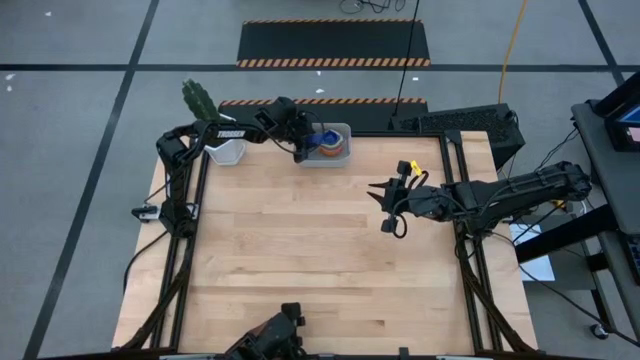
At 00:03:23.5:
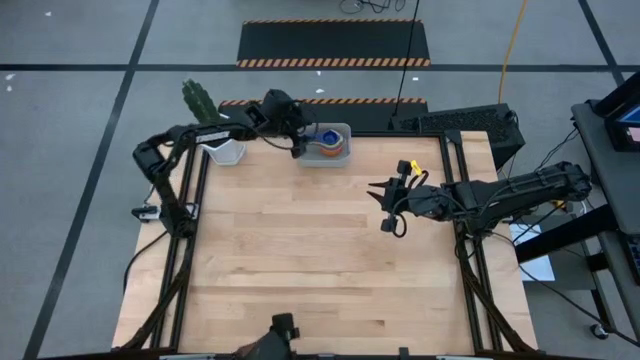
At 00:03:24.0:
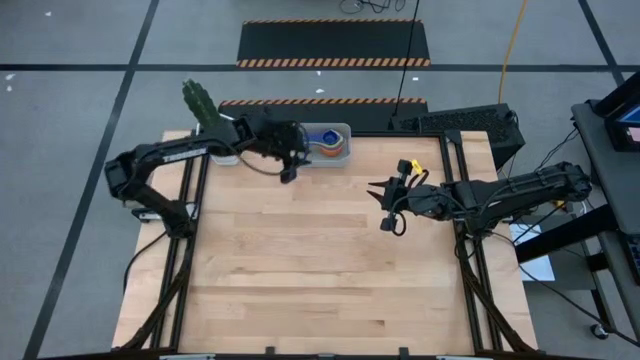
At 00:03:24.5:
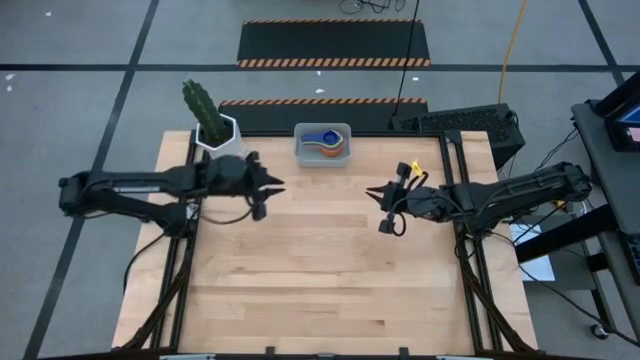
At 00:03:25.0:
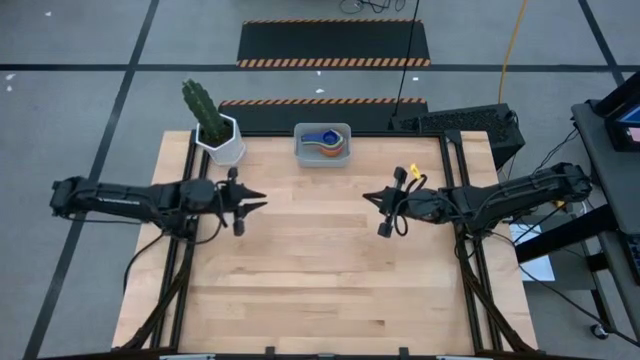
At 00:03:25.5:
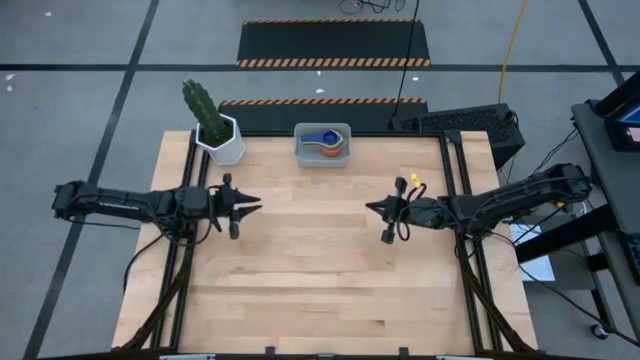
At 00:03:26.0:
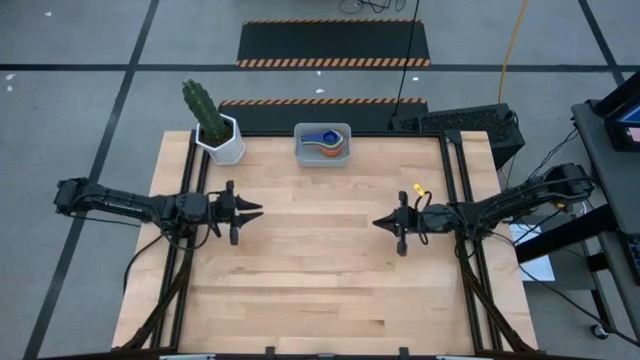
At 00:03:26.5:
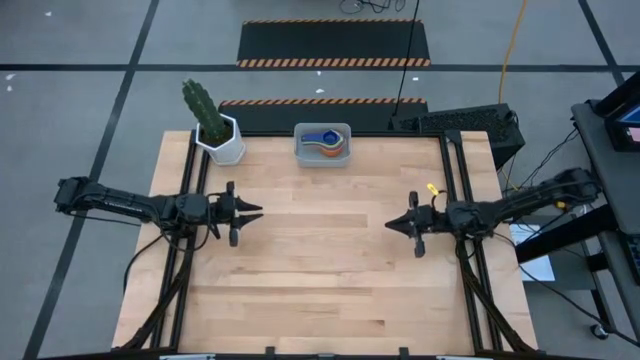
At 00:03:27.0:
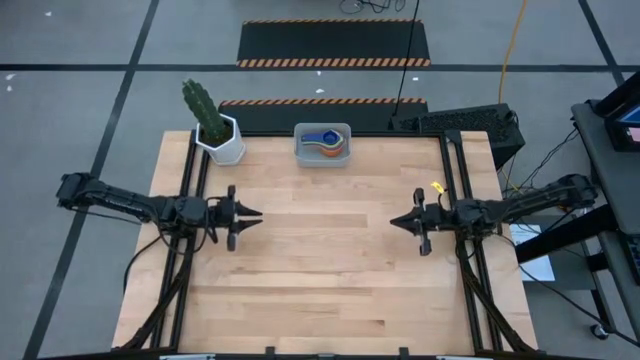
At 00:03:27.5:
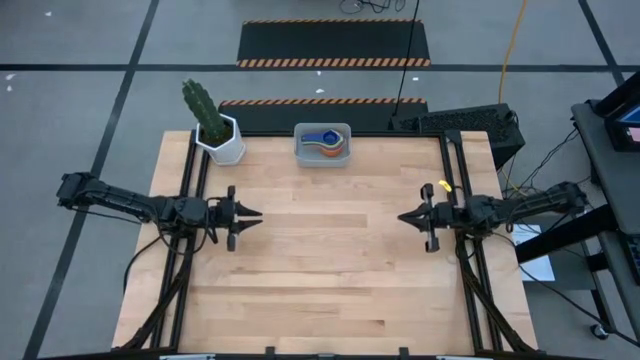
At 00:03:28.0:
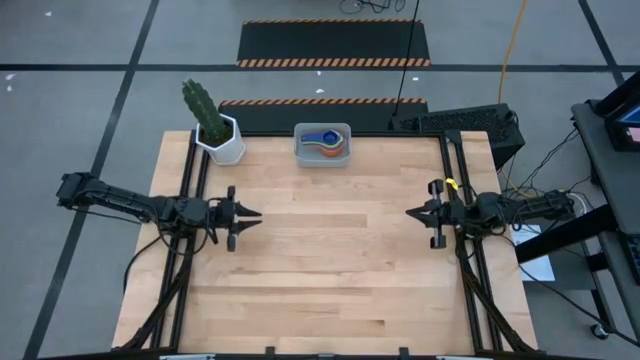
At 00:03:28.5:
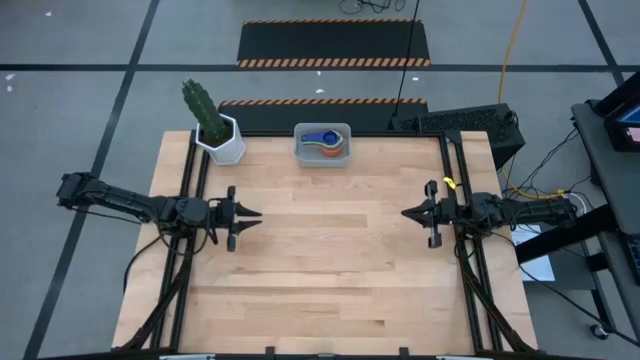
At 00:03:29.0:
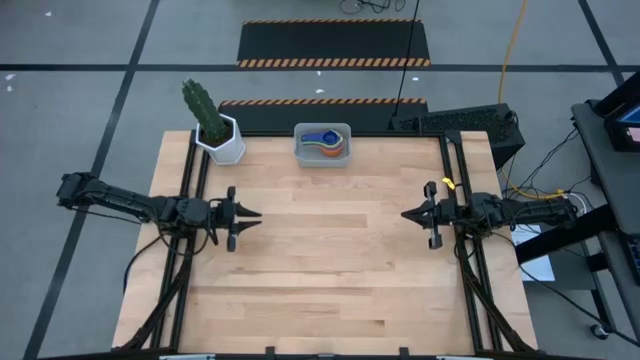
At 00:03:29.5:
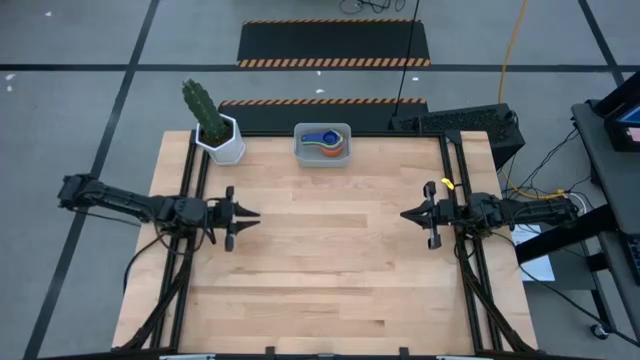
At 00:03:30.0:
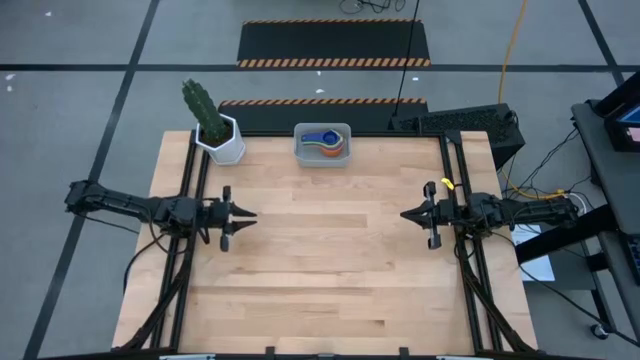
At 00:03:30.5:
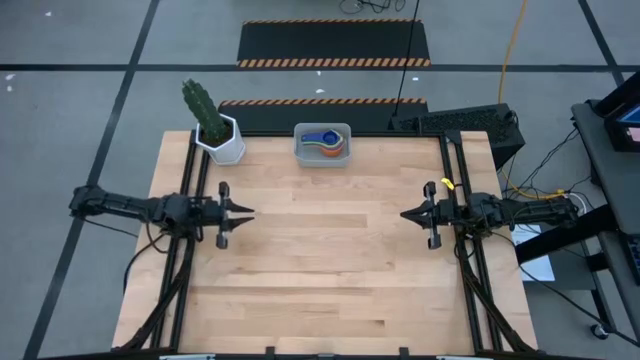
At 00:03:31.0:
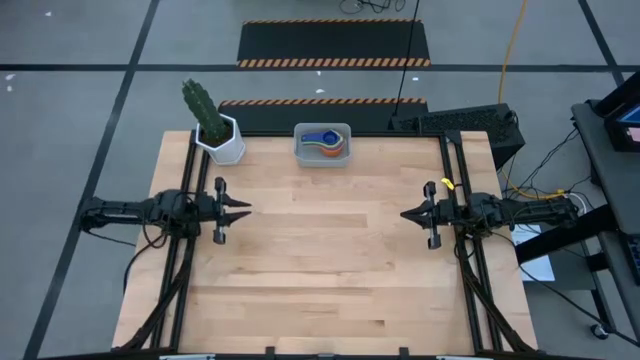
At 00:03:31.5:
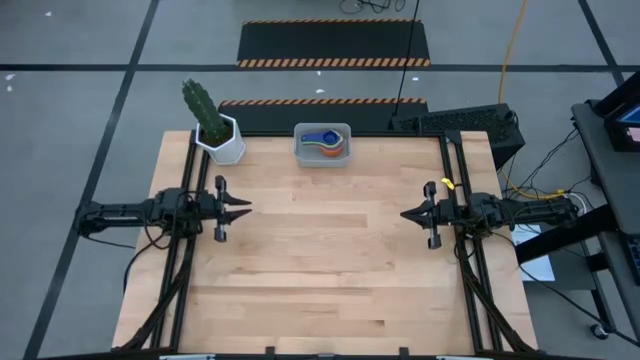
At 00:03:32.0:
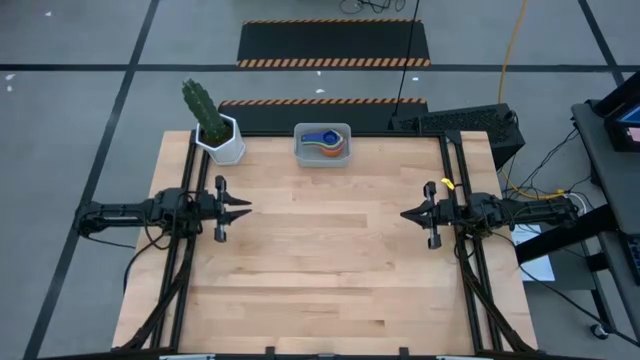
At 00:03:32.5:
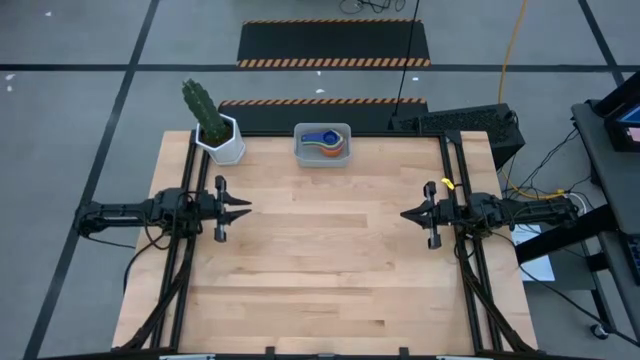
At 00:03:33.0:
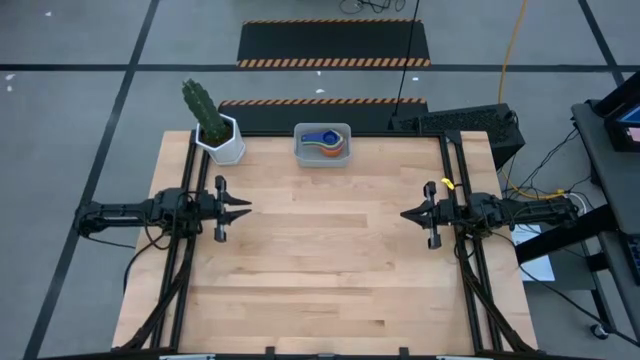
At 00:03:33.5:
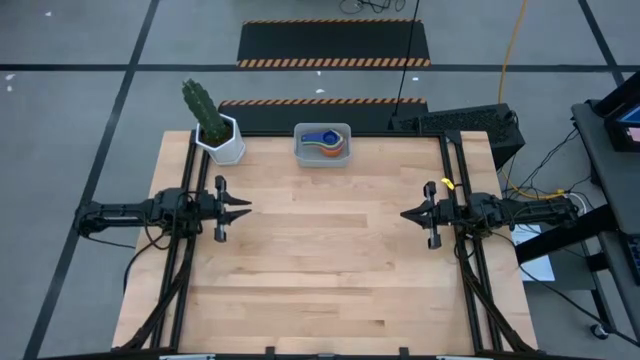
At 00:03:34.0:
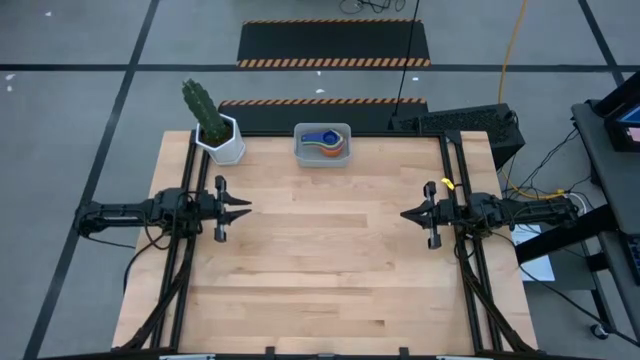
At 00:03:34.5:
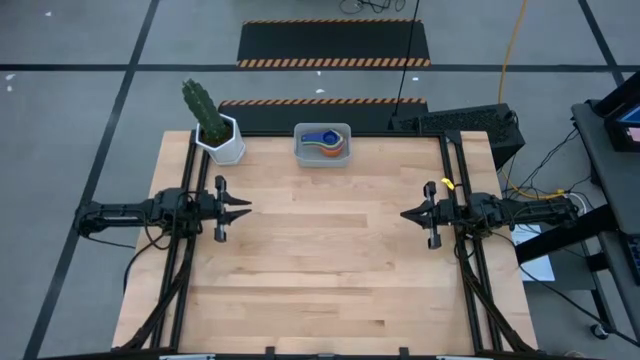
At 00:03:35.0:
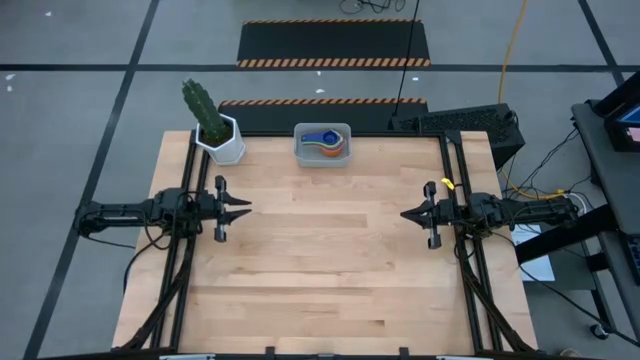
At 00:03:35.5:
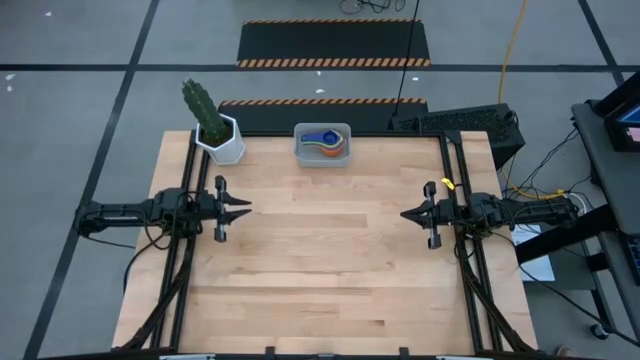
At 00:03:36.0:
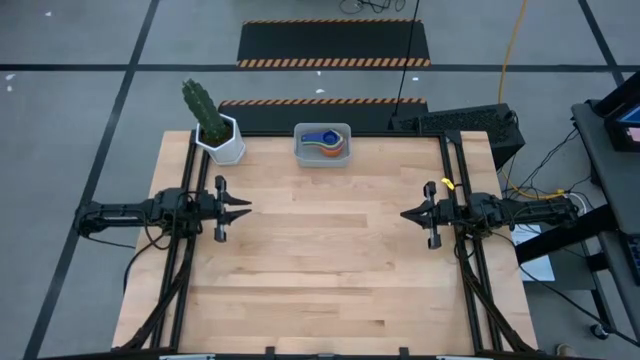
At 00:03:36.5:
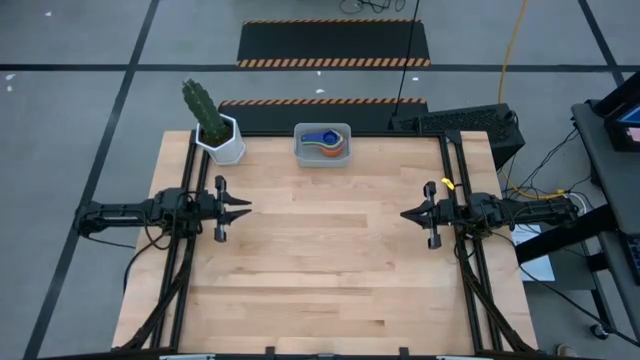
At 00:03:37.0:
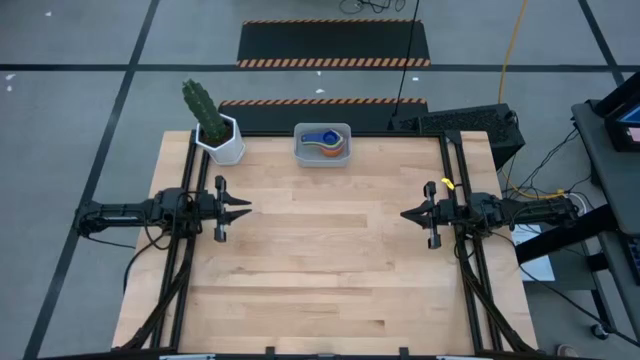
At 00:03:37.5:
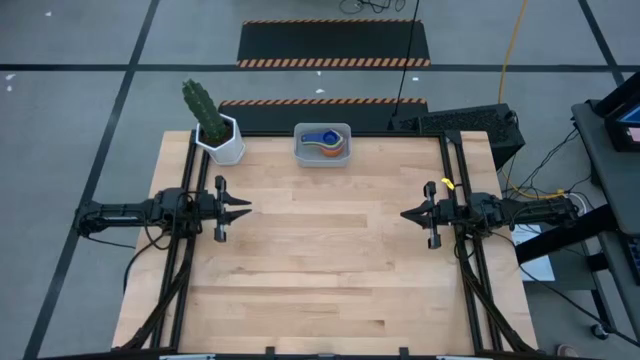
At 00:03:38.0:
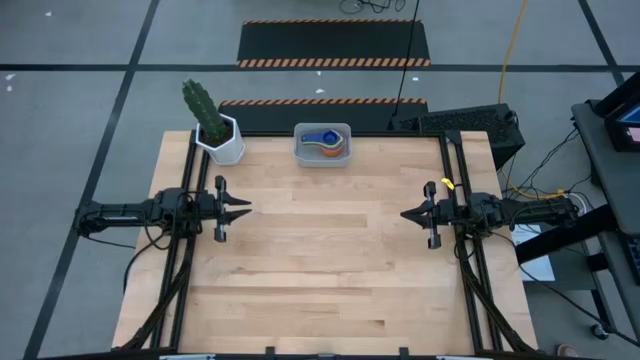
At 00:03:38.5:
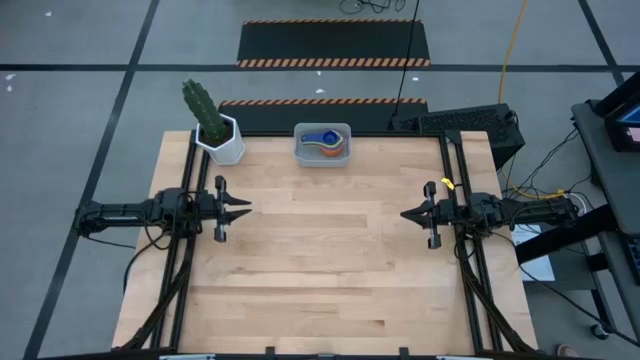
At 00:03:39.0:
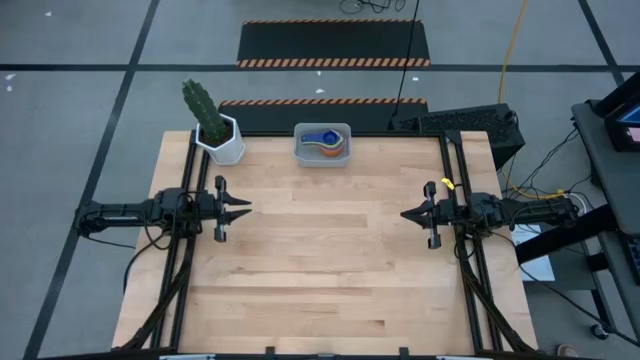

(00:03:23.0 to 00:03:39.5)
Task: Nest measuring cups in basket
Return to Home Position

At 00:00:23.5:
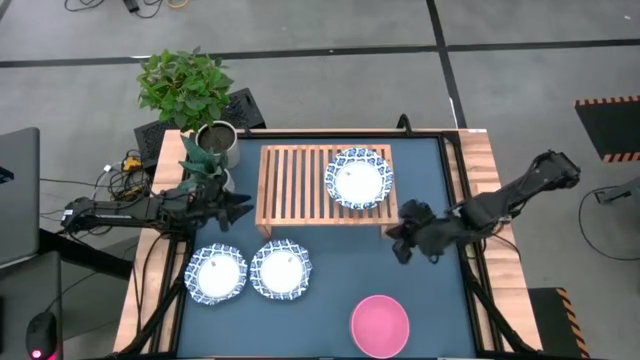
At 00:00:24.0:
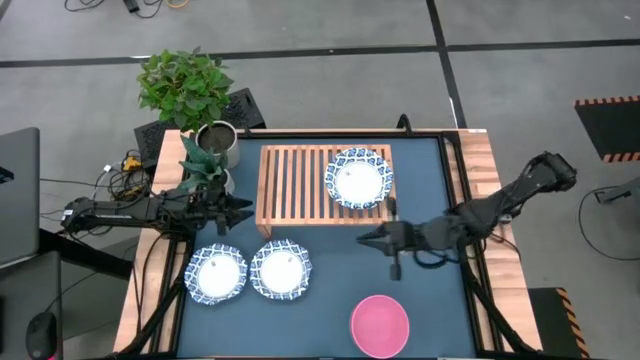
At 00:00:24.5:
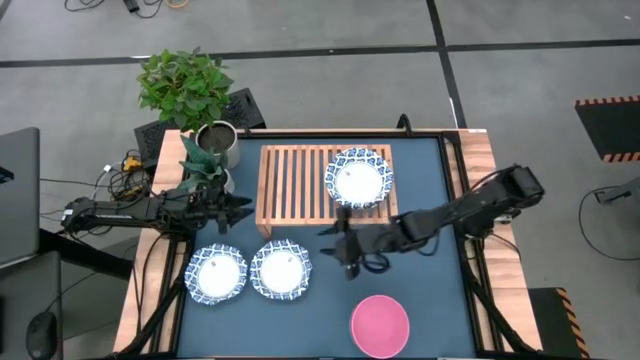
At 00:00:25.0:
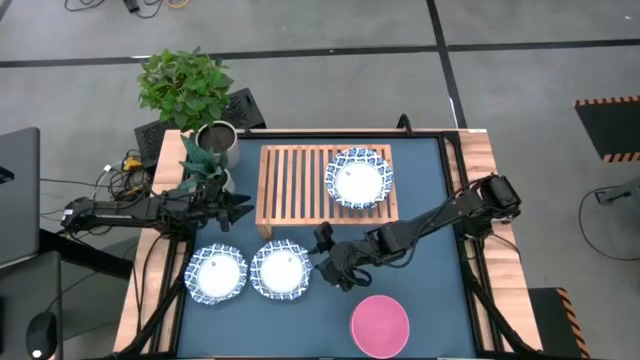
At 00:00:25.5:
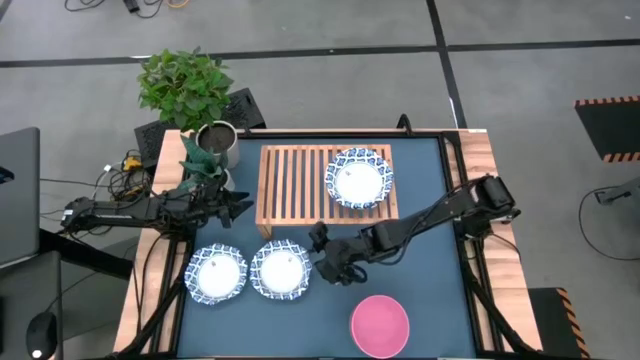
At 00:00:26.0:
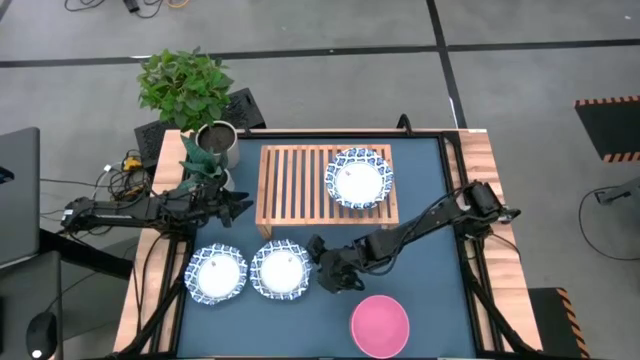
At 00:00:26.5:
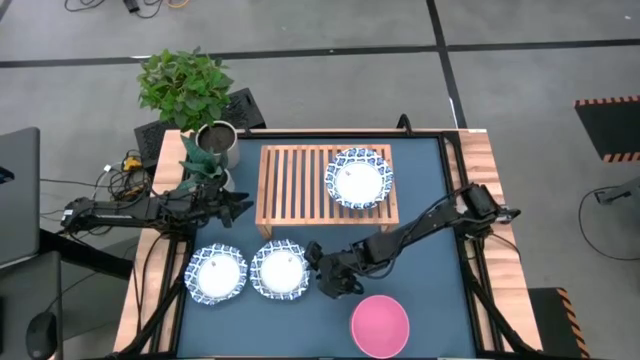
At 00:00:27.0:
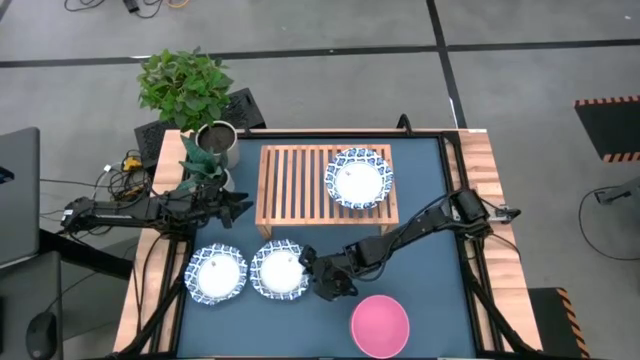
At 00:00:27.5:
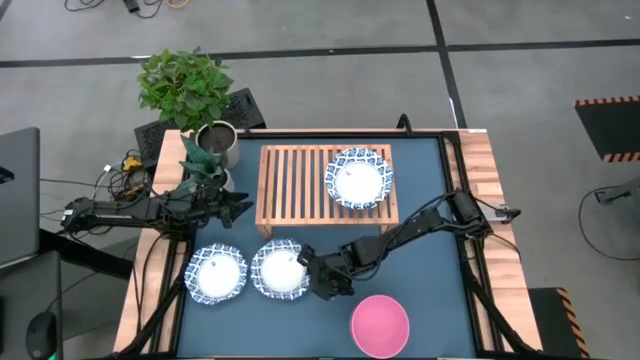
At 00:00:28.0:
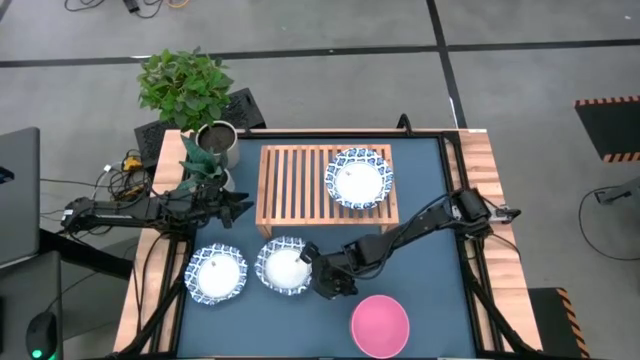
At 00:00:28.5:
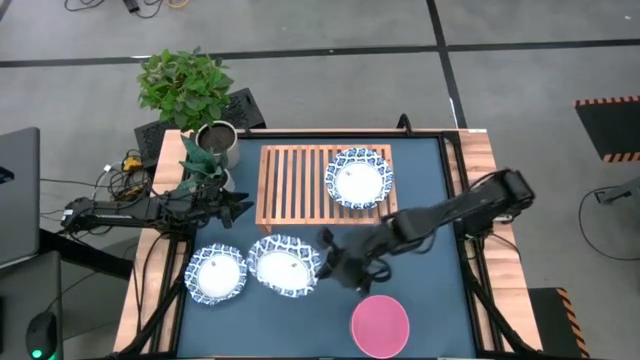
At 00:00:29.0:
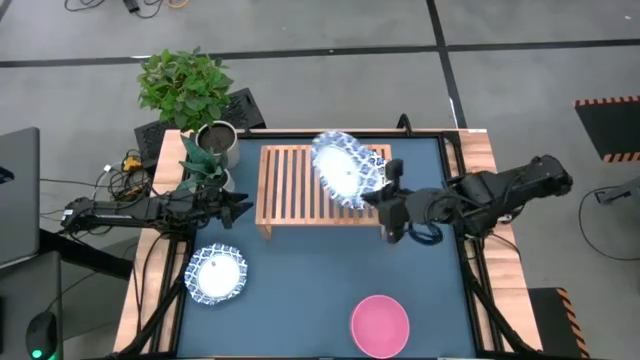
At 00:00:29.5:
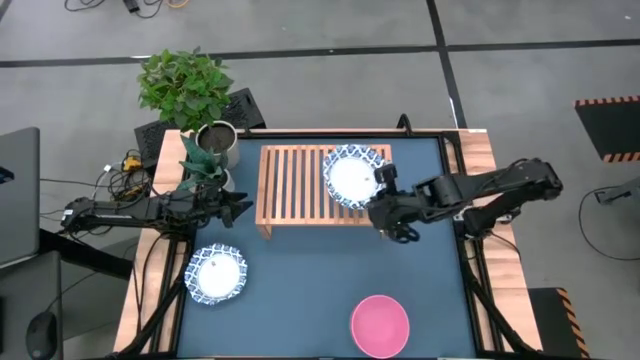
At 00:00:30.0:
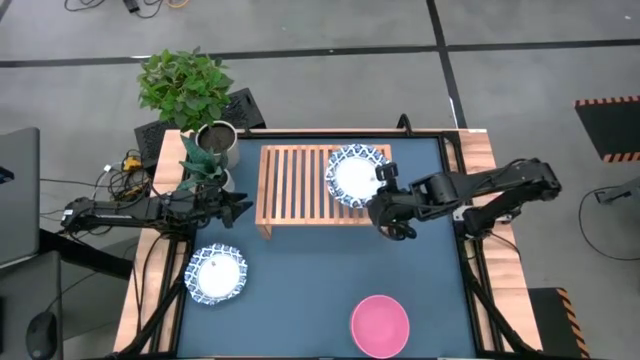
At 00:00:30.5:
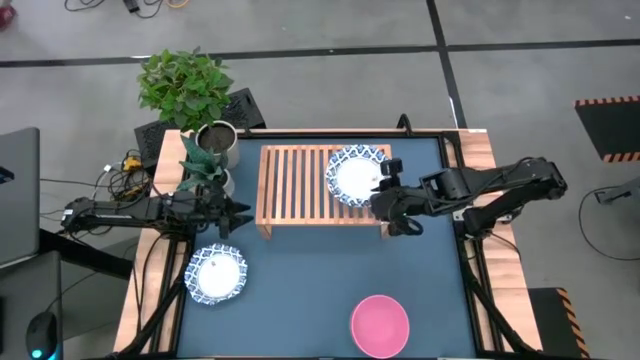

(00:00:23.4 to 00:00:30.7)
Task: Place and stack bowls onto a shelf
Stack the white patterned bowl on top of the white patterned bowls on the shelf
